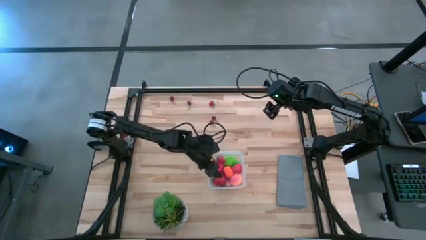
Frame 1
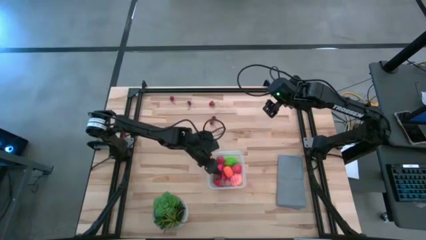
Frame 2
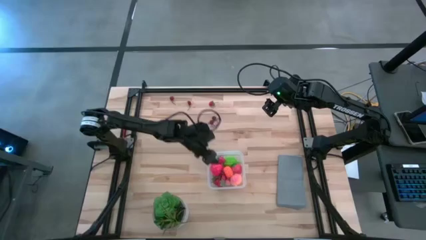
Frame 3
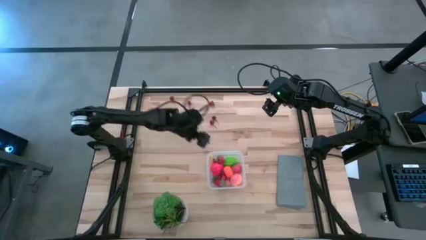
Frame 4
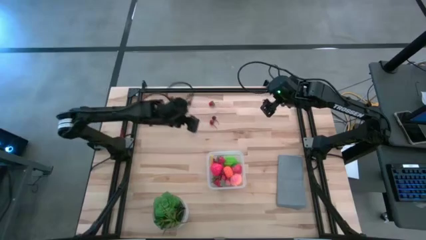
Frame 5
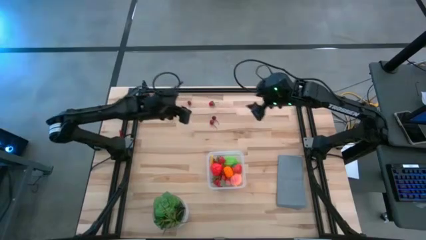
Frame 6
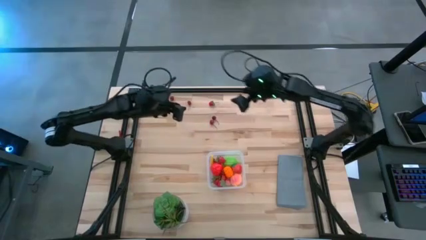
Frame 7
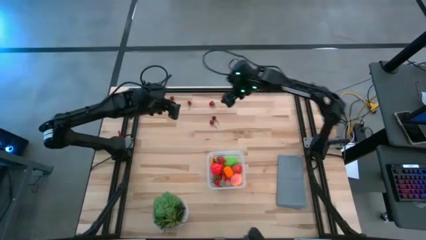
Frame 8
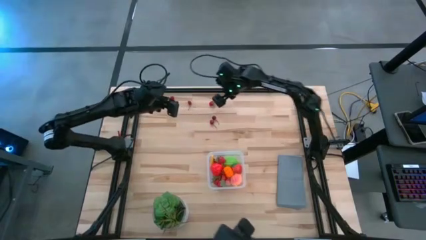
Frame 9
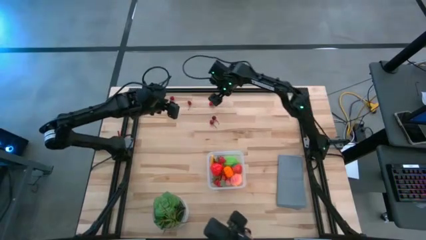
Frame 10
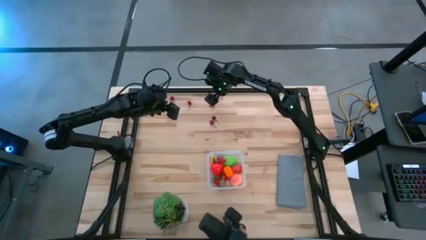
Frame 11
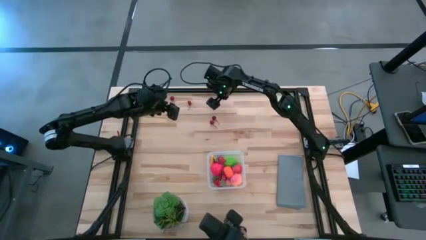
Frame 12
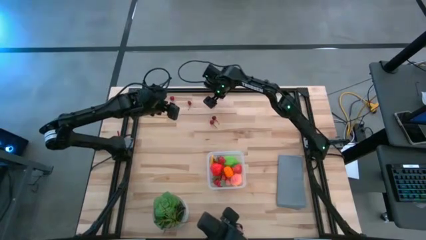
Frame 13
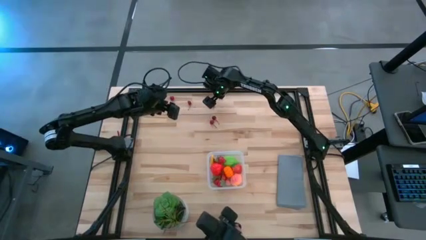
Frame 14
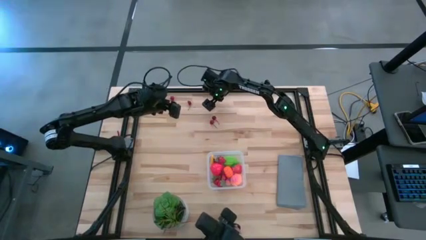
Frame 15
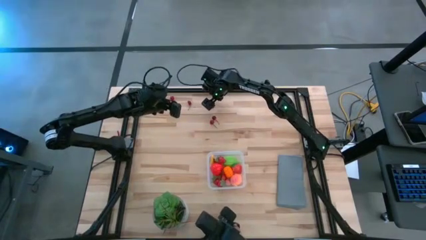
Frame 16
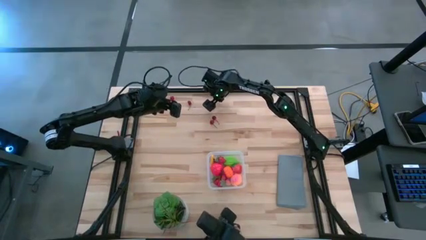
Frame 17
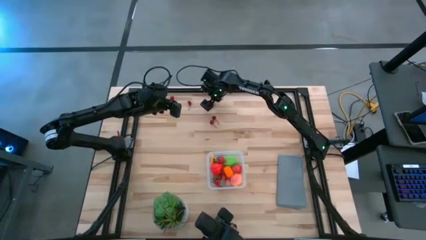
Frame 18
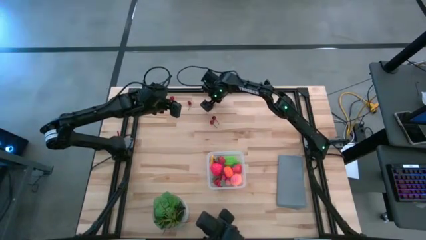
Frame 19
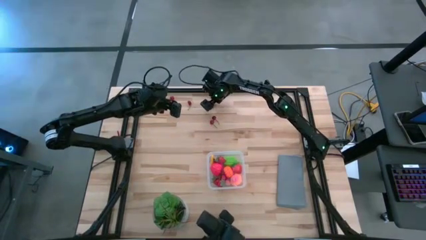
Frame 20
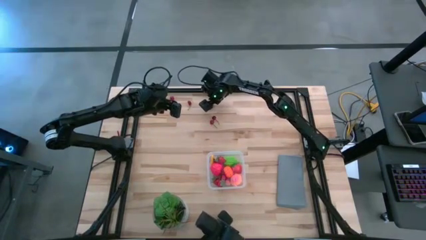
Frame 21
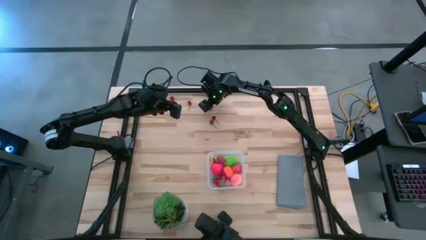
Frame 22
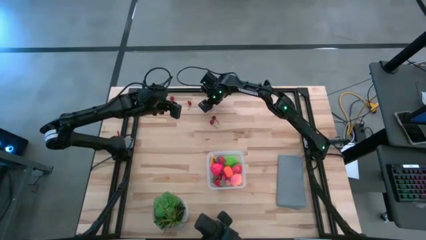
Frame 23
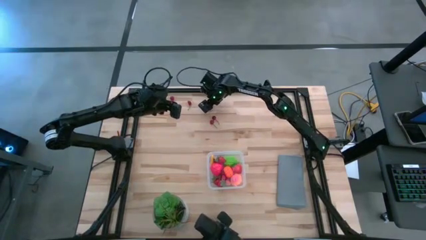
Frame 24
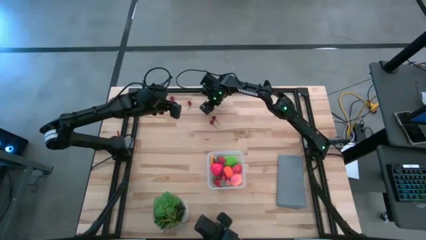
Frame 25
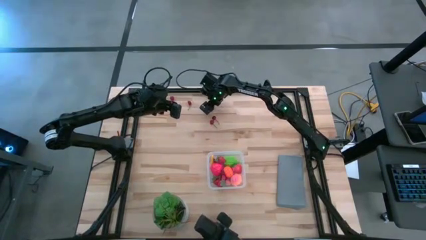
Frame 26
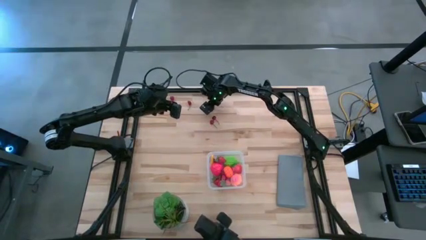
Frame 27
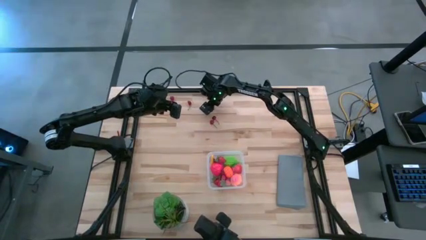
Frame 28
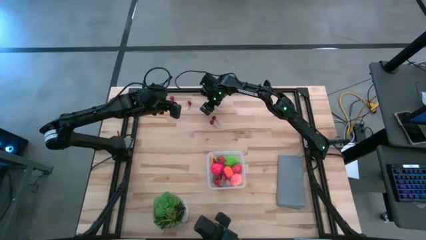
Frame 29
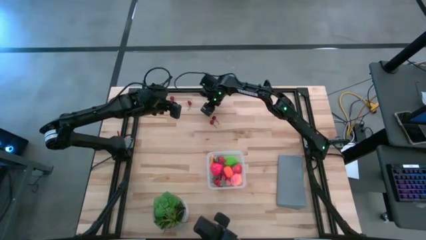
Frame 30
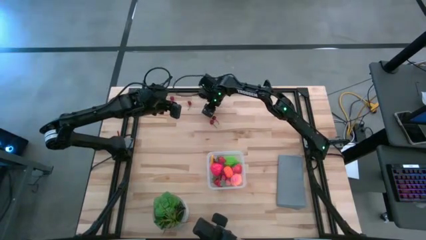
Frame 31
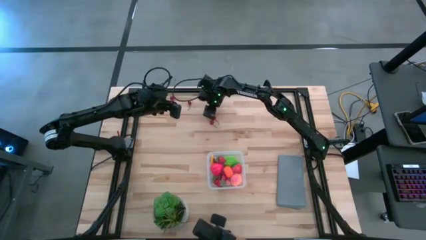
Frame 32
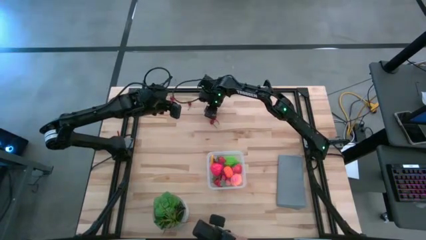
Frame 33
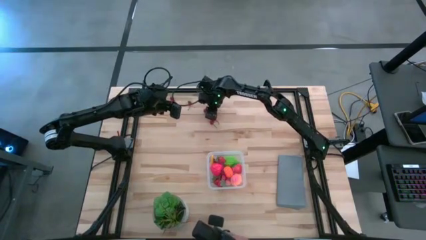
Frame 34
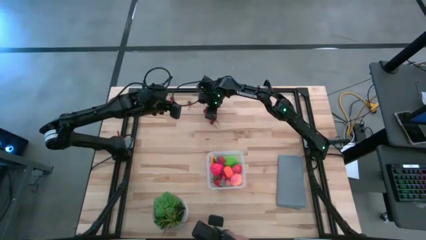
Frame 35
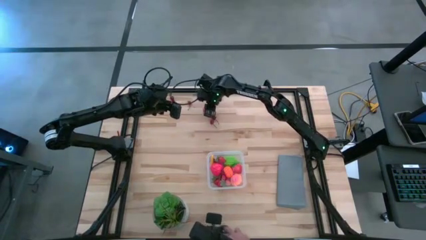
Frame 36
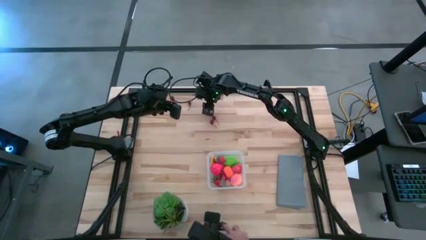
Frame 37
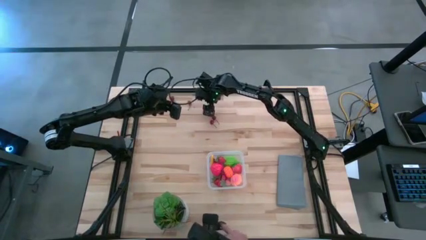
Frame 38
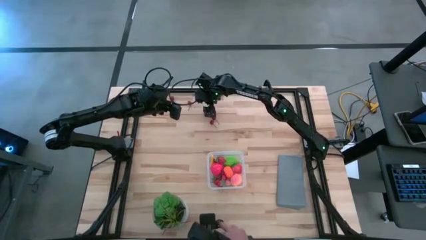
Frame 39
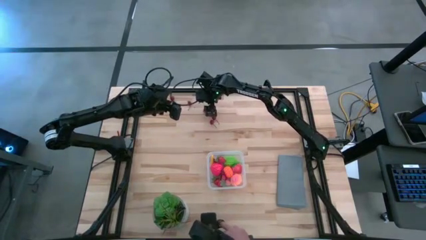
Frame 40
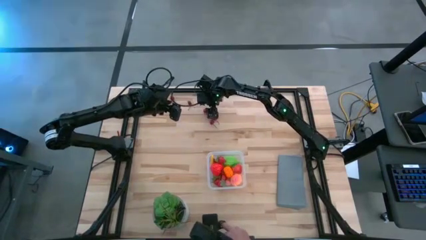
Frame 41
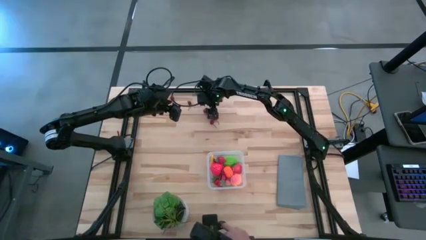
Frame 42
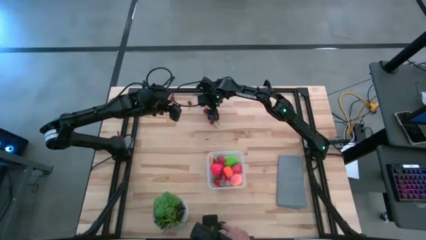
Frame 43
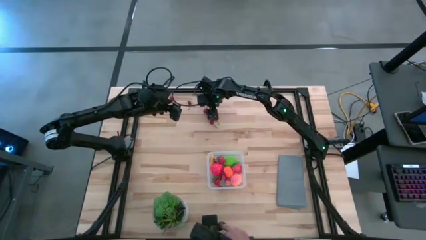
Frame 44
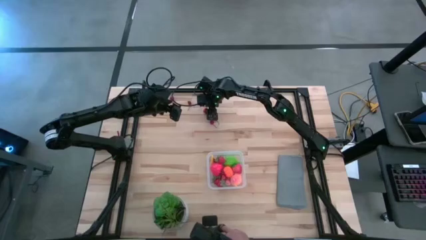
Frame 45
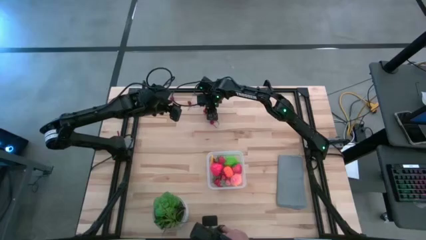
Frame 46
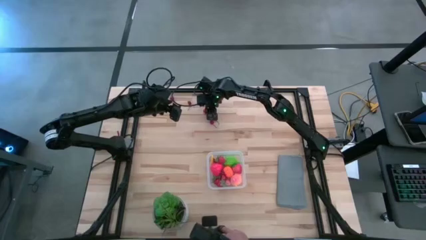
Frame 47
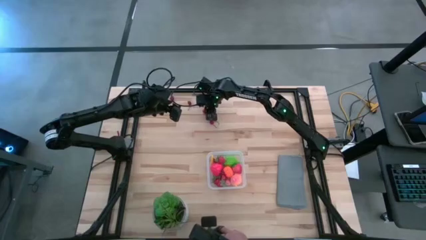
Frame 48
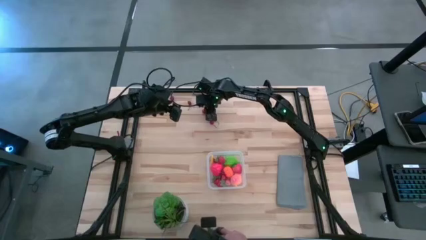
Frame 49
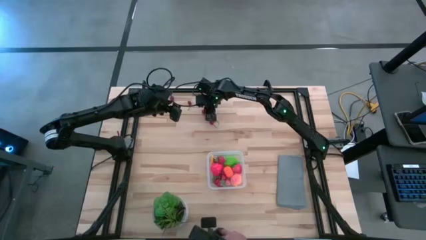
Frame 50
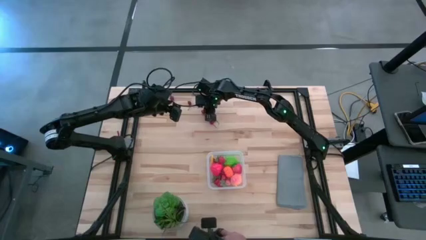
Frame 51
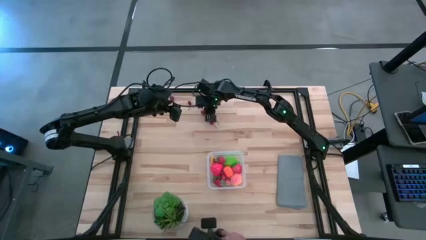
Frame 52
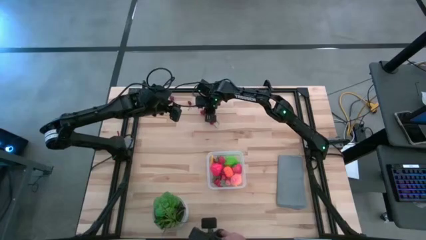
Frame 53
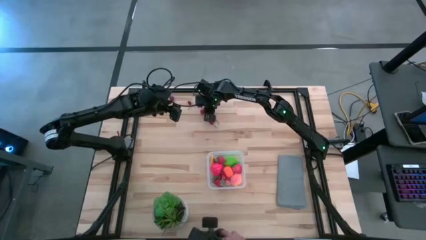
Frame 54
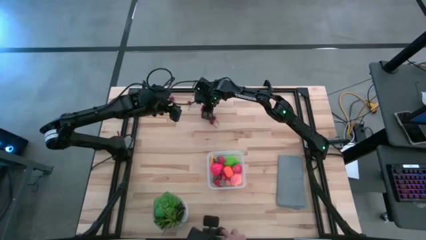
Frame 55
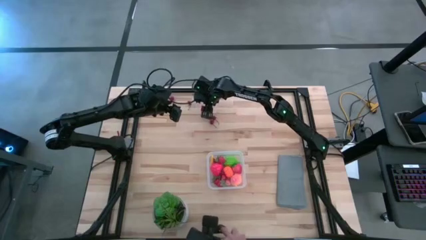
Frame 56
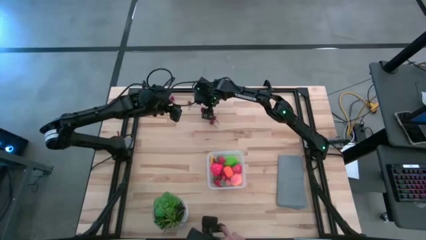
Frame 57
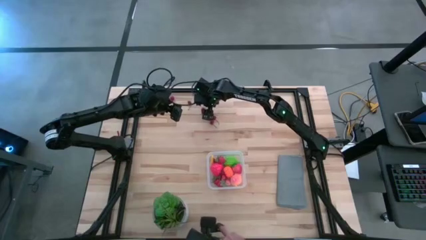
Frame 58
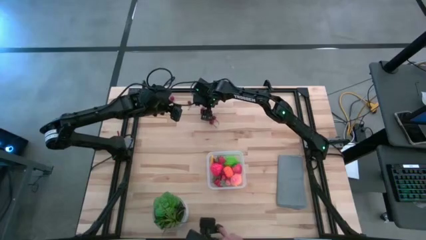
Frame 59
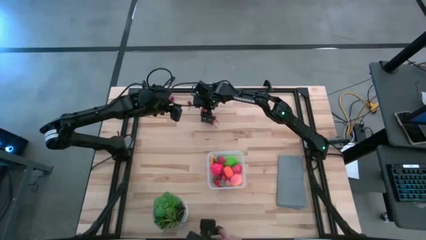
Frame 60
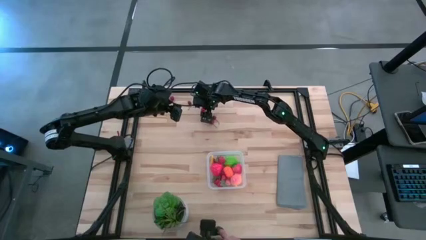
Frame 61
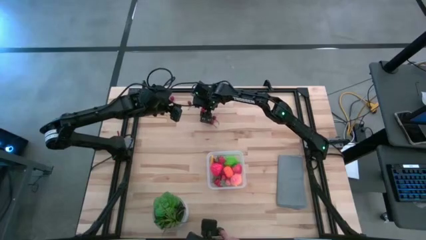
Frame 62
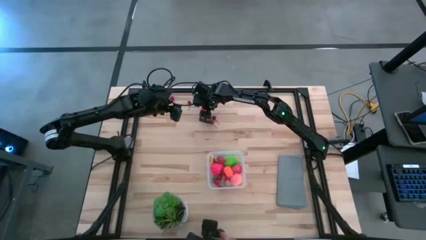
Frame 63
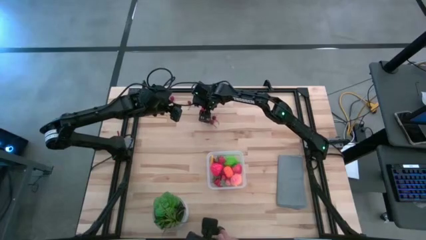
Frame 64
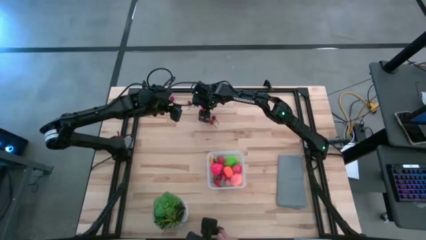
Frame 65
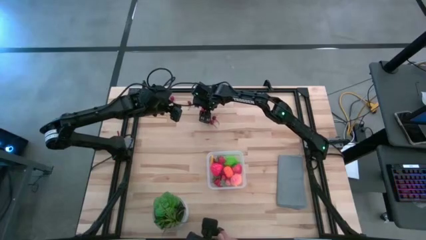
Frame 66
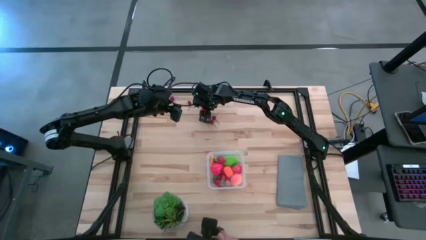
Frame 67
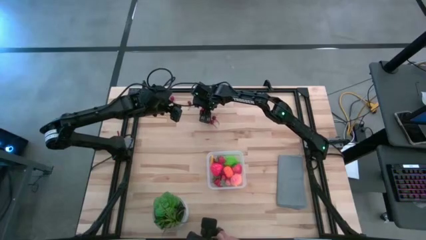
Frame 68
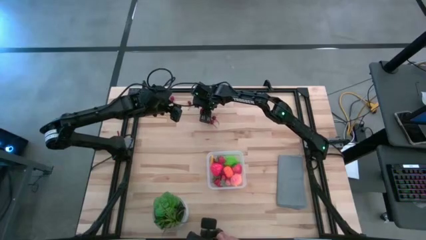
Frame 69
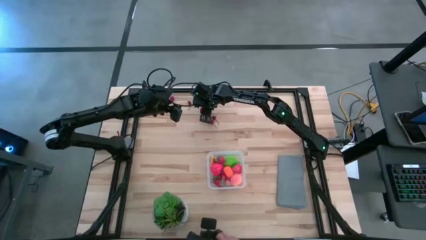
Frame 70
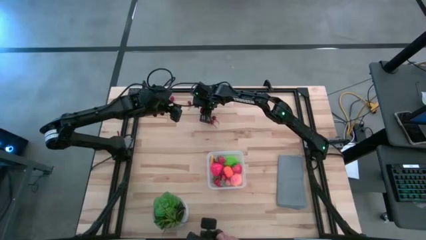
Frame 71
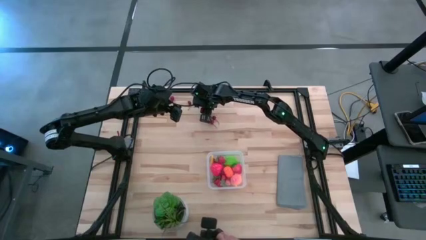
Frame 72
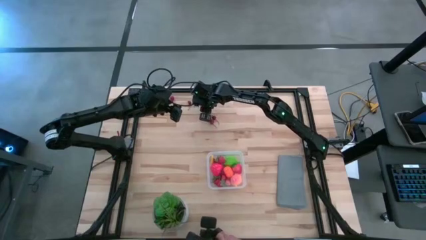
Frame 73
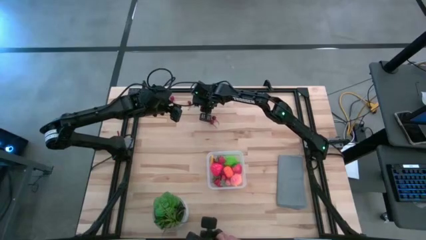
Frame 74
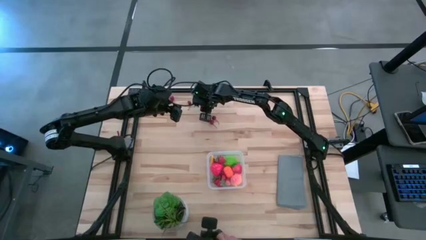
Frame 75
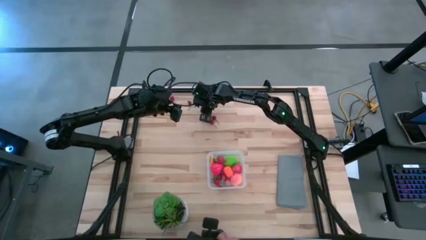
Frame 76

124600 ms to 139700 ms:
Task: Pick and placing Produce into tupperware
Put the red strawberry into the transparent bin

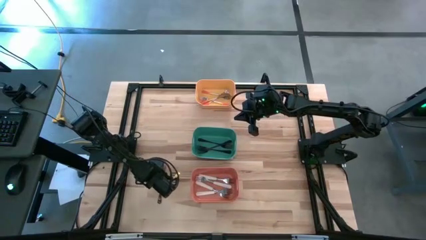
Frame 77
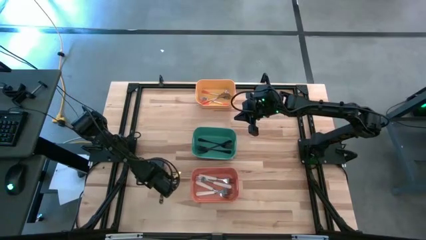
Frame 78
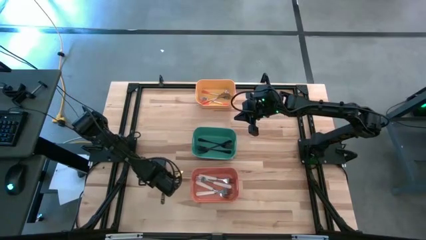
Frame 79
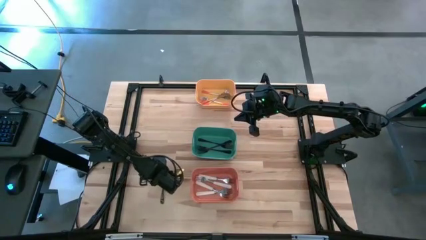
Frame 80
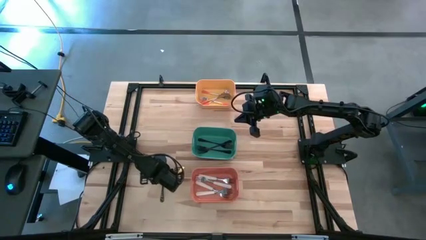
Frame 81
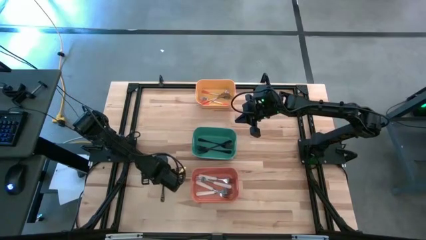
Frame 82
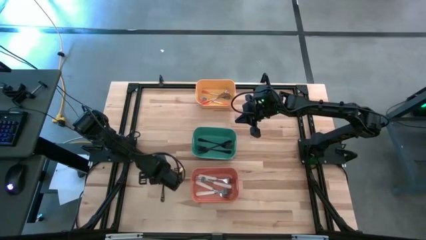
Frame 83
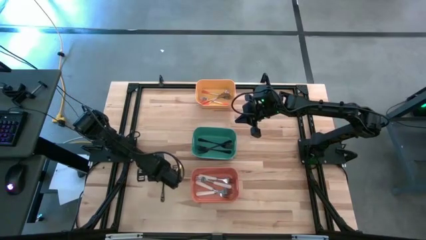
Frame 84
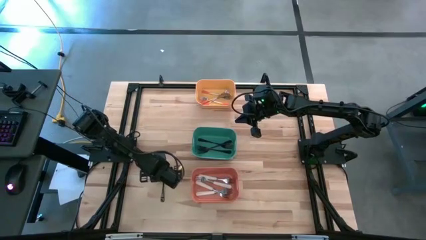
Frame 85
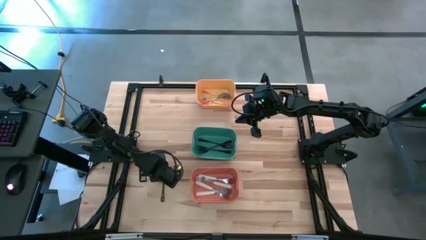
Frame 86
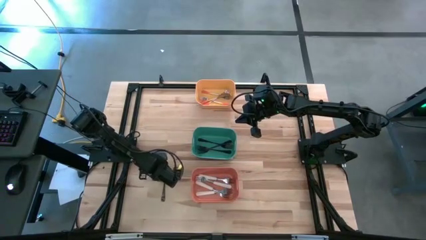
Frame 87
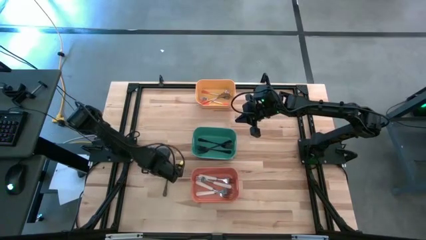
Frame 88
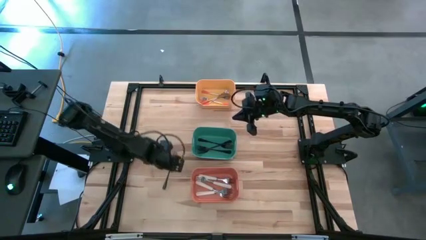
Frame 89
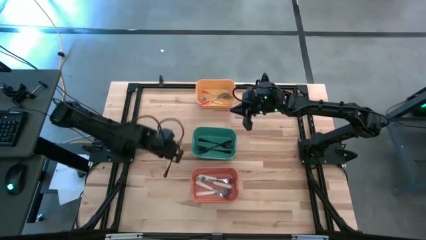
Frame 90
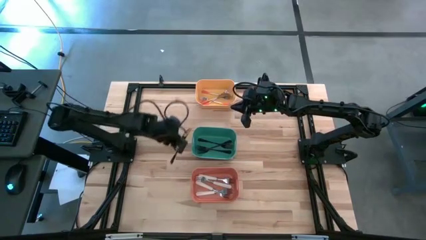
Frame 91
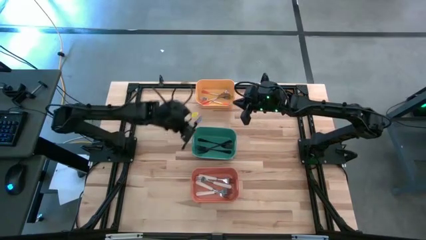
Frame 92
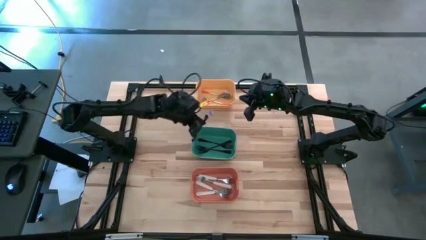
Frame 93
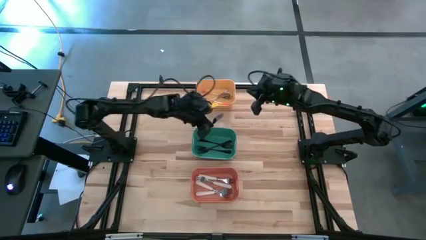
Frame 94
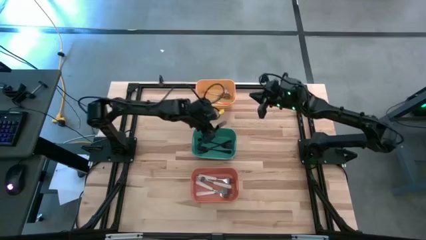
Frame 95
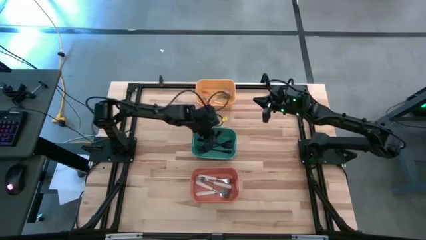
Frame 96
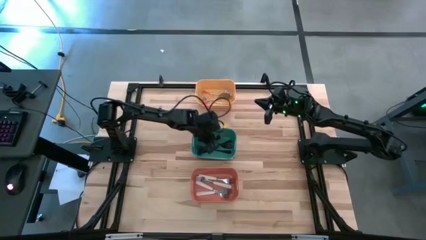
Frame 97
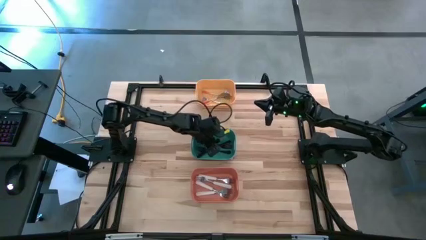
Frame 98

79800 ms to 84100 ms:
Task: Sort silverware by color (type)
Put the black fork into the green bin
